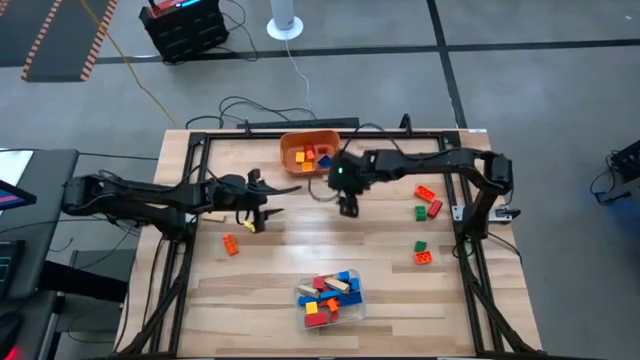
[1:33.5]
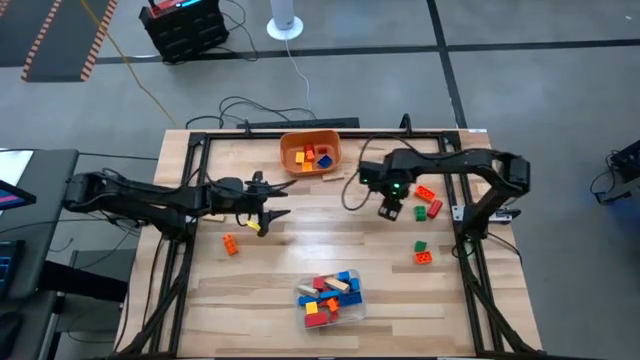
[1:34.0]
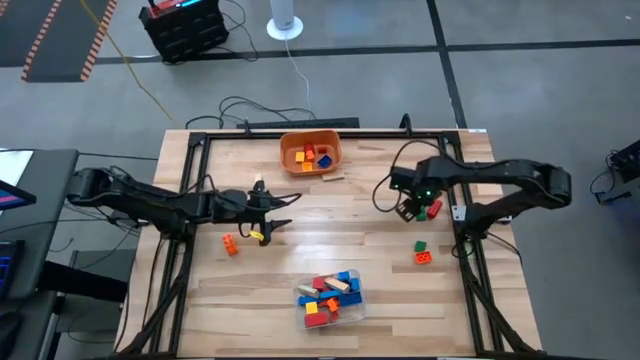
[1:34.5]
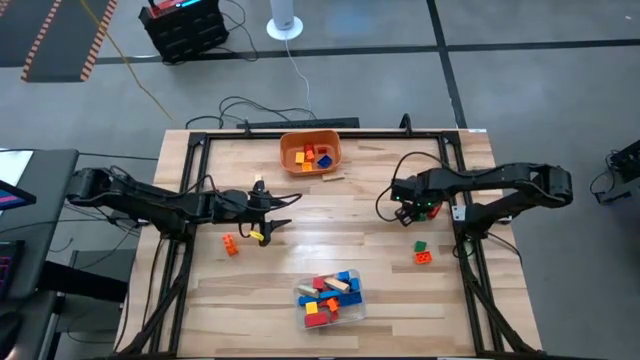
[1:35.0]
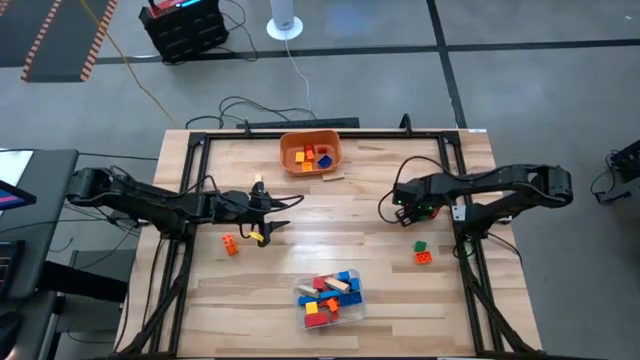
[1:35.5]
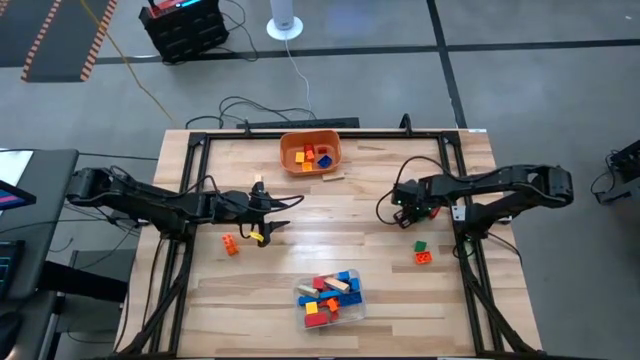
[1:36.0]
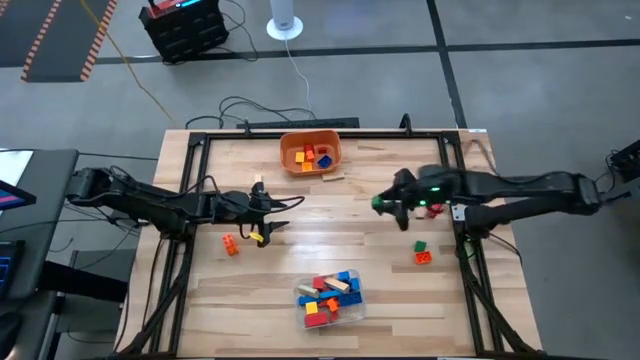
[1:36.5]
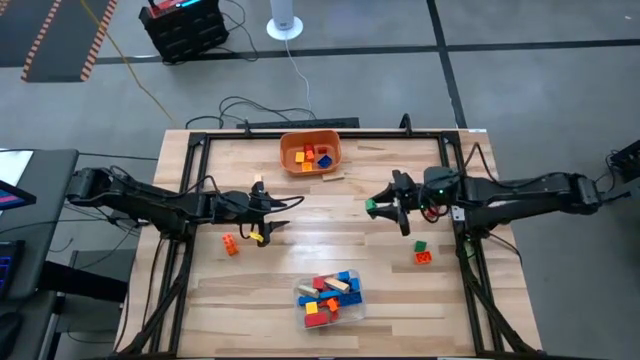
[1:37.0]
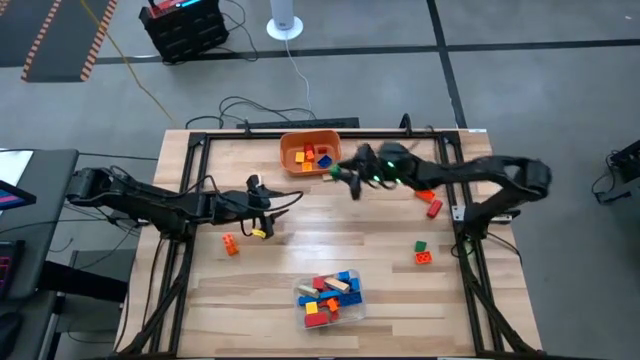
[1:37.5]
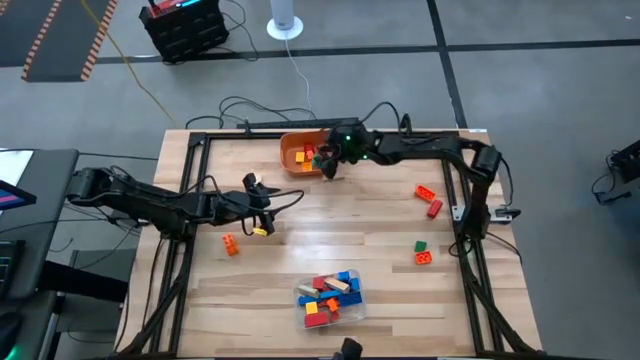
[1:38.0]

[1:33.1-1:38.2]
Task: Sort blocks by size
Put the small green game piece into the orange bin

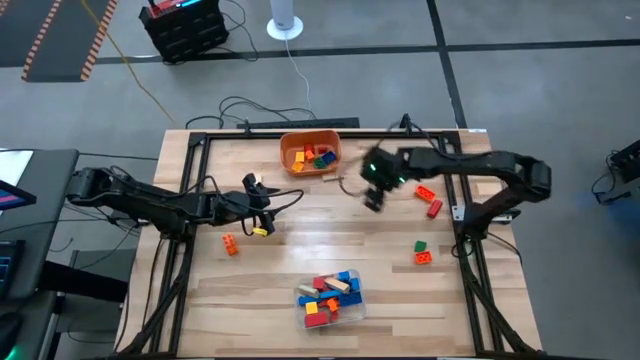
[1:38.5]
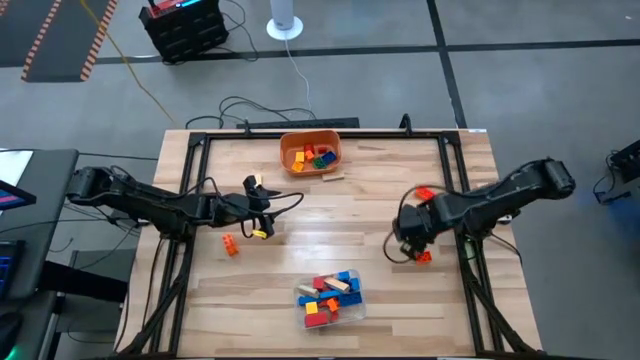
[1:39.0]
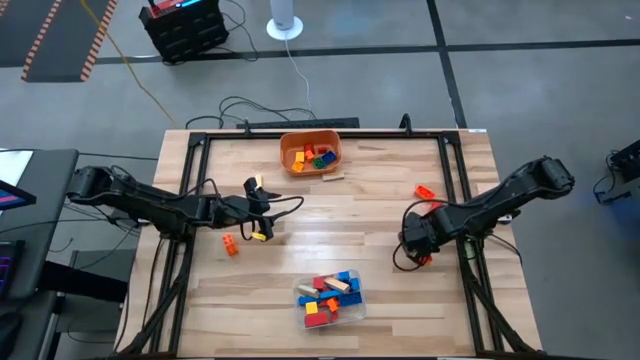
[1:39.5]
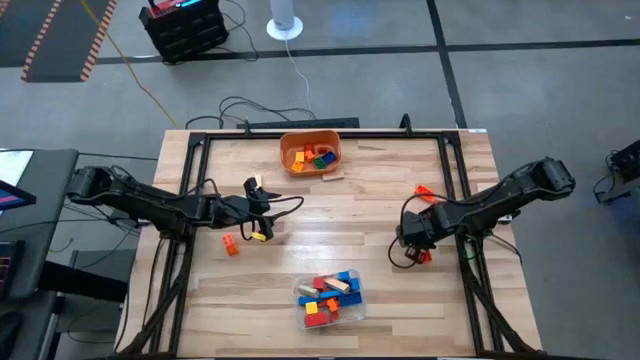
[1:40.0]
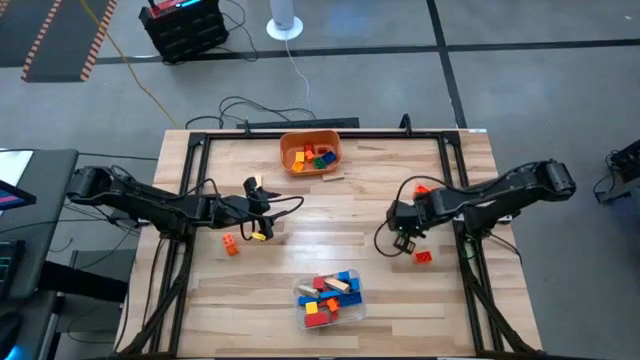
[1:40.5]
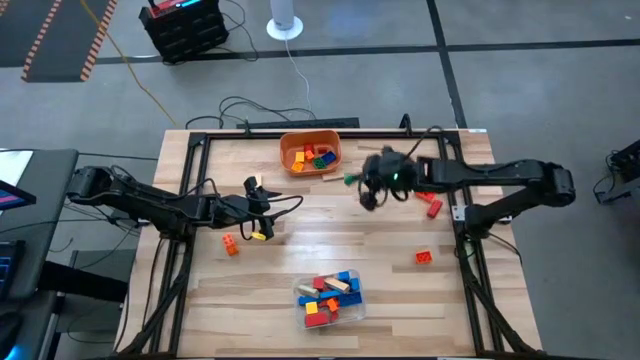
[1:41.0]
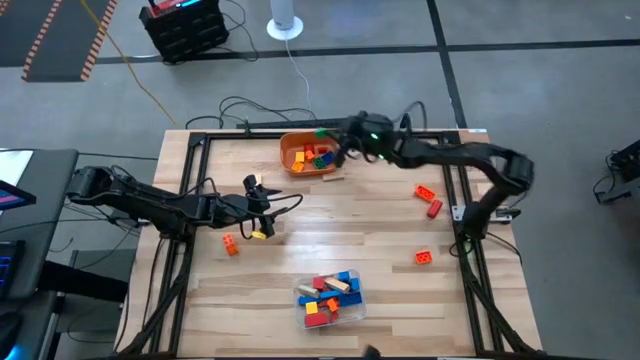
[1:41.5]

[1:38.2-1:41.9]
Put the small green game piece into the orange bin

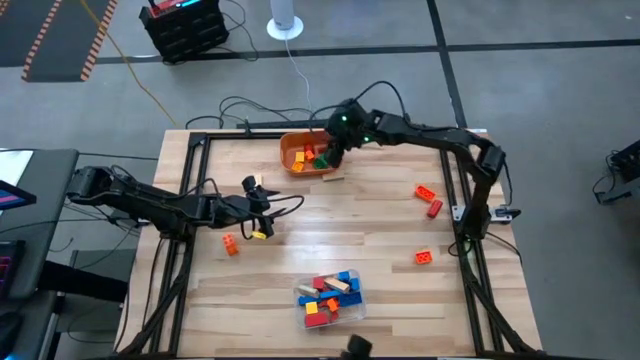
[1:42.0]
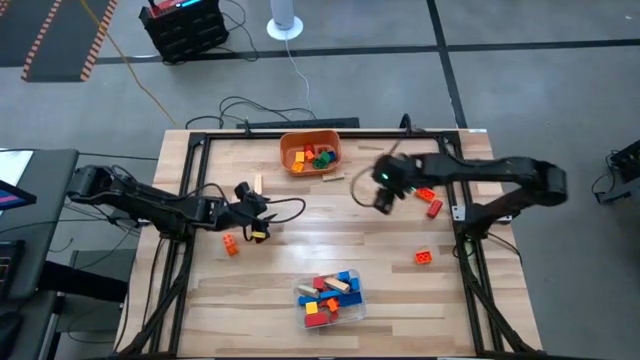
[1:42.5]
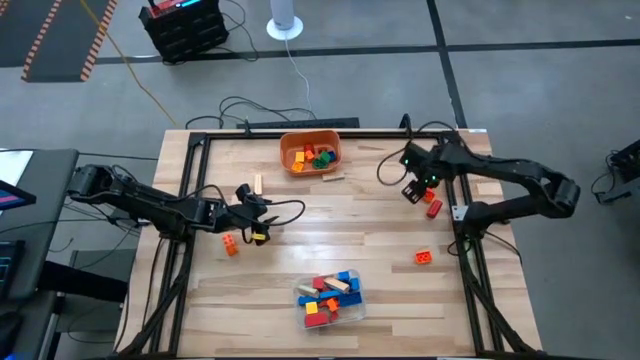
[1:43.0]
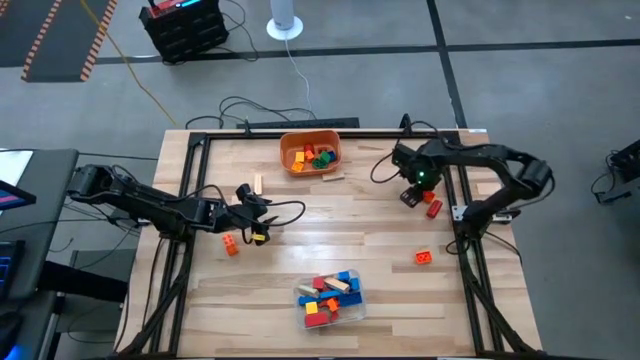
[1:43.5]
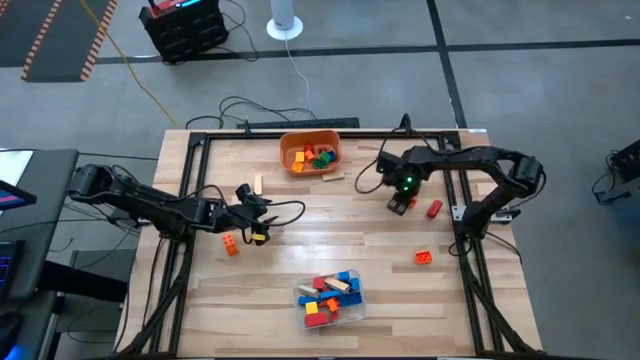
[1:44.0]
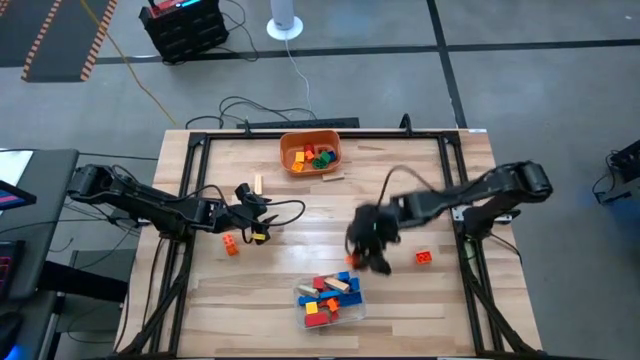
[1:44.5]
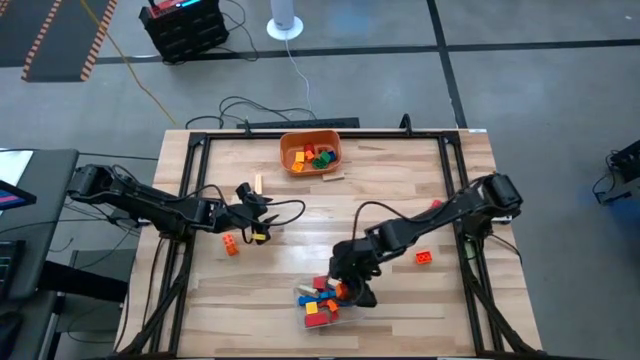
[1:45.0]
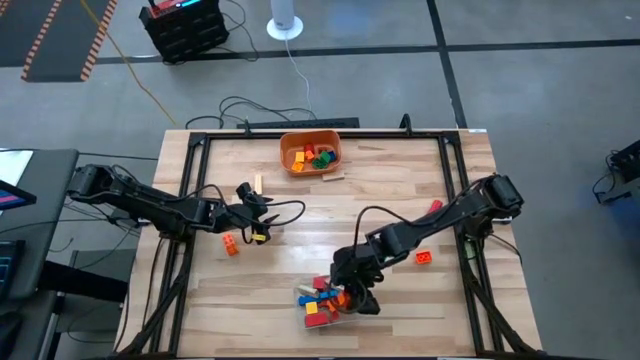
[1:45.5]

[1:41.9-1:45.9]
Put the large orange game piece into the transparent bin

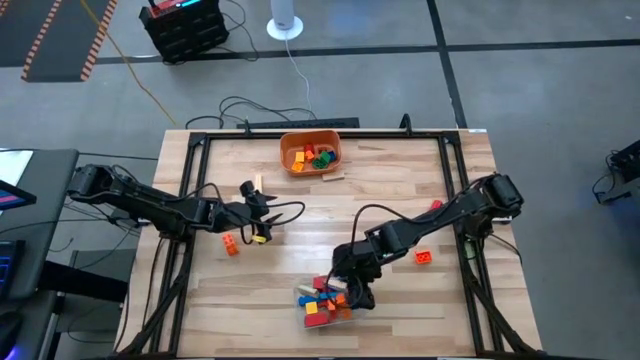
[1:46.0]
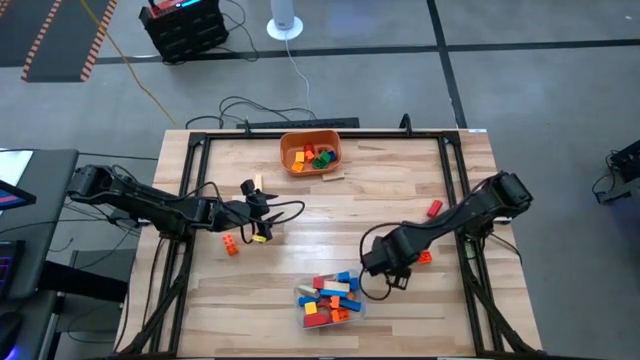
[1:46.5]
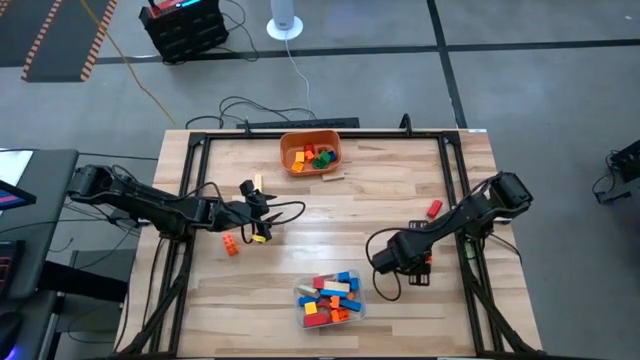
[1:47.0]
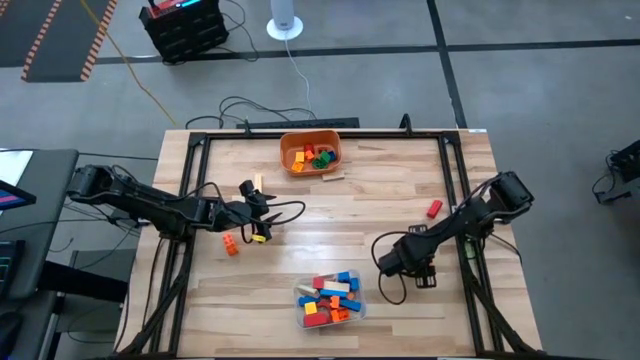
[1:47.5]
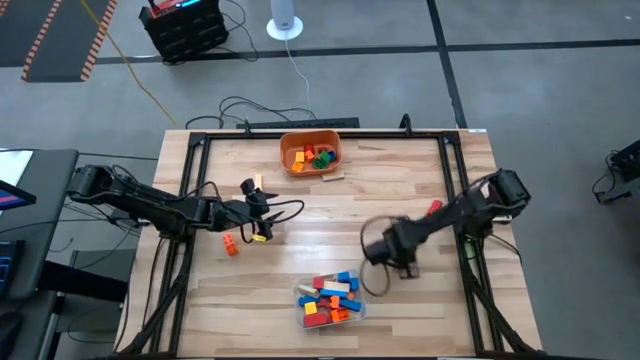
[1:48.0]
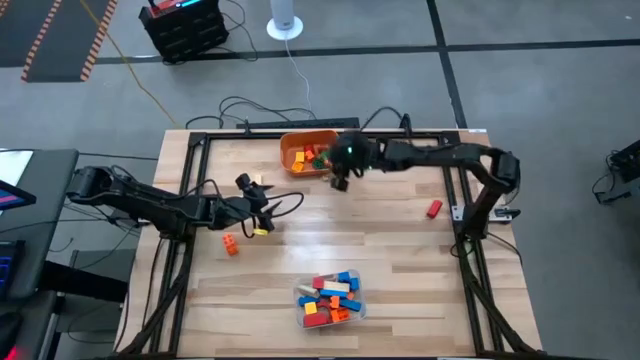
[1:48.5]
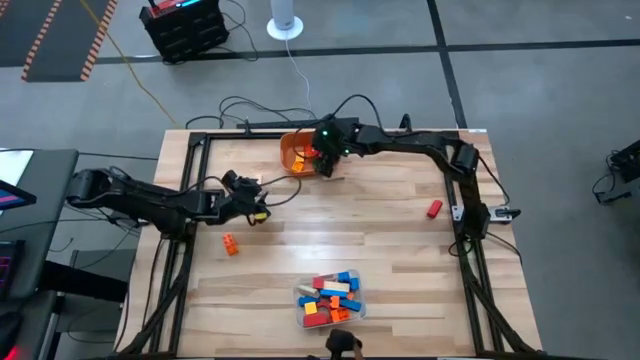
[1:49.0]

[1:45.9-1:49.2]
Put the small orange game piece into the orange bin

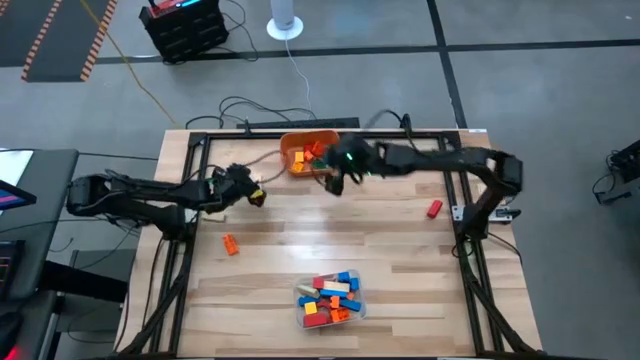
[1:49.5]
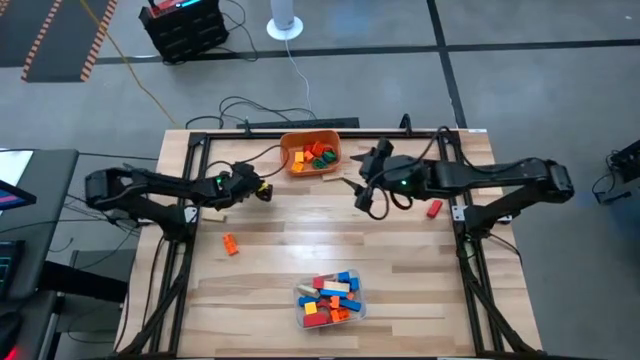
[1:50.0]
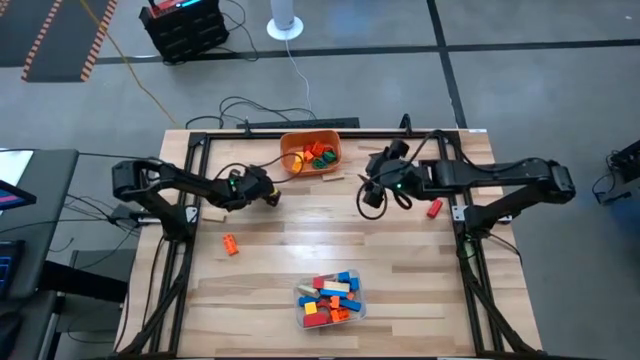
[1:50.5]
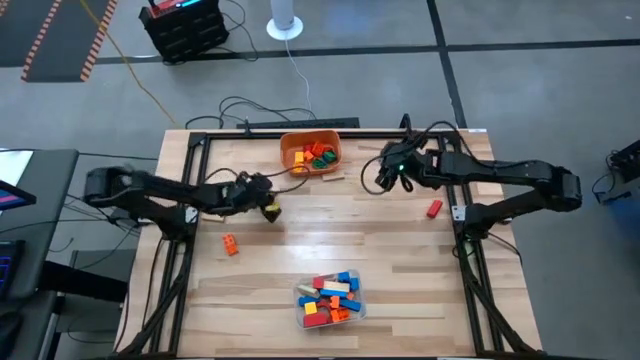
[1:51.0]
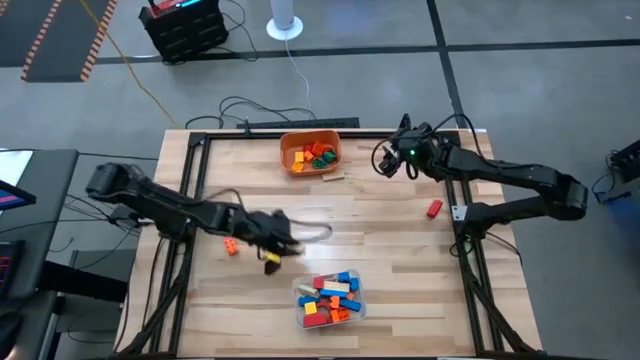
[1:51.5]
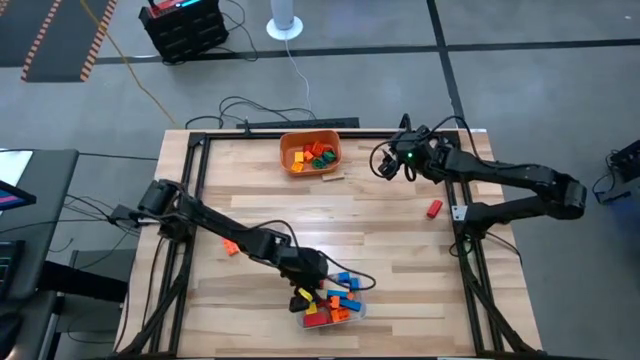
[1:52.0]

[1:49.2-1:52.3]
Put the large brown wooden block into the transparent bin

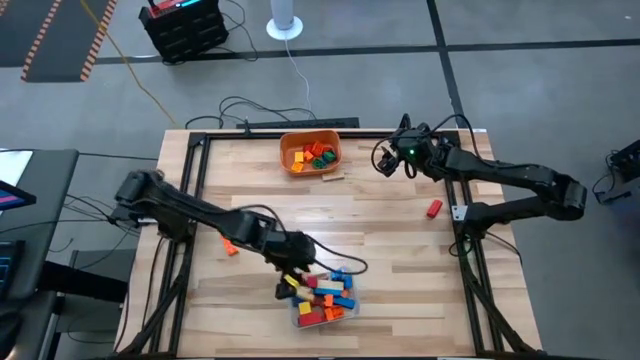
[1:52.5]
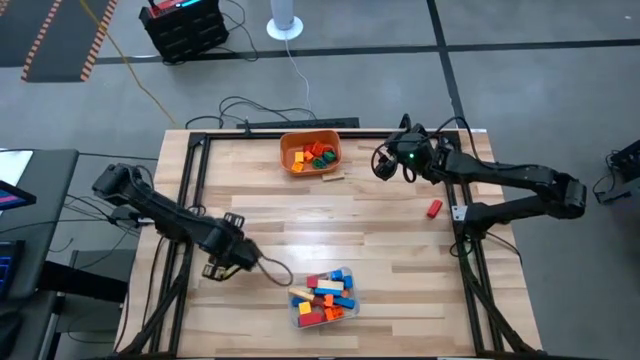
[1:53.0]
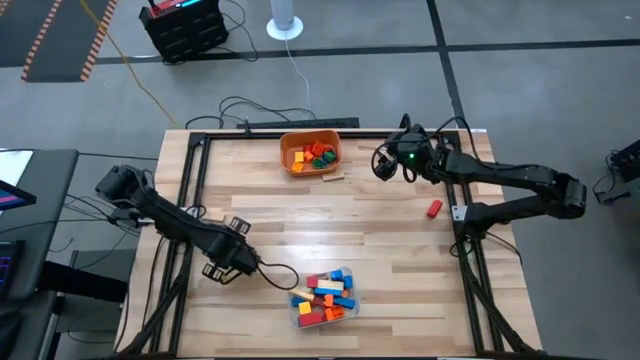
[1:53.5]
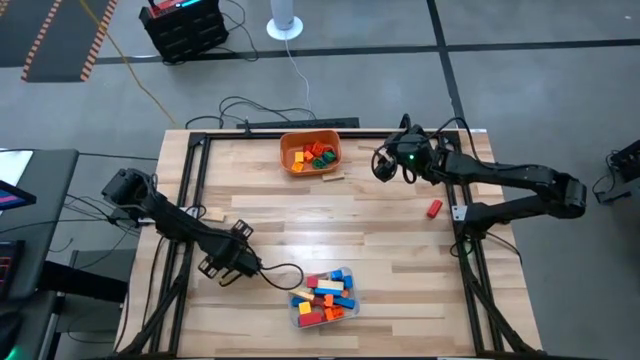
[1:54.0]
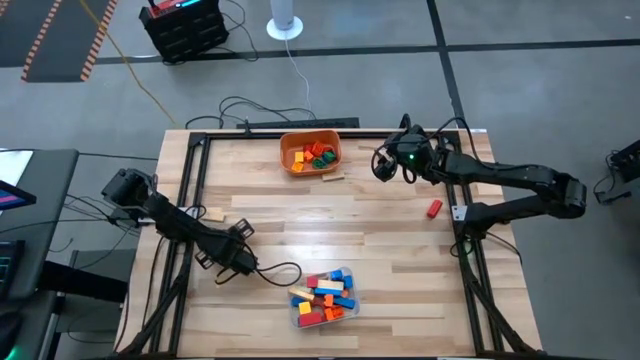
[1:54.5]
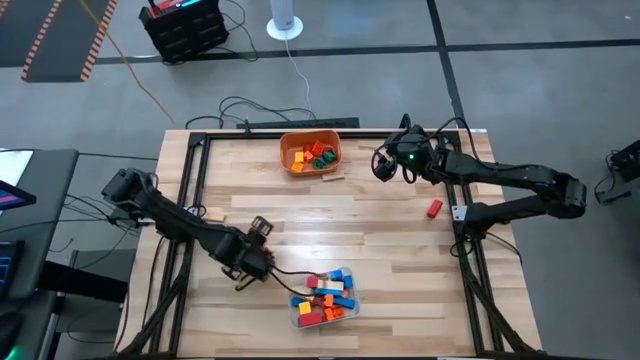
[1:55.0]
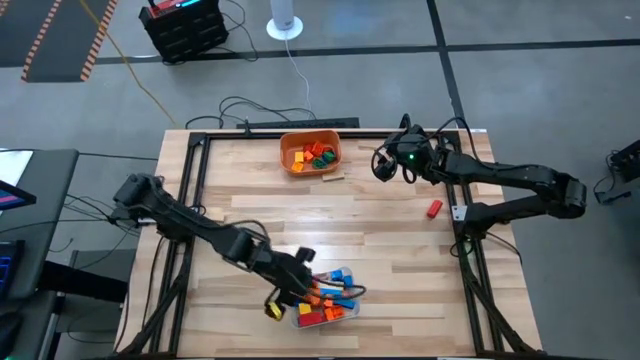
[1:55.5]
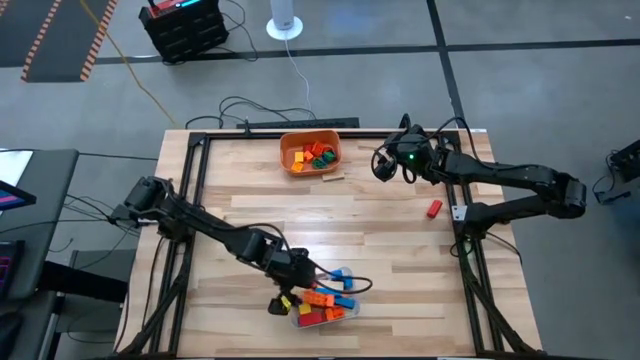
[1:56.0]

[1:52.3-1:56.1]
Put the large orange game piece into the transparent bin
